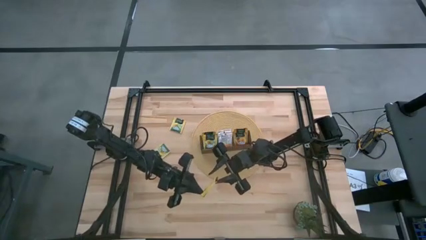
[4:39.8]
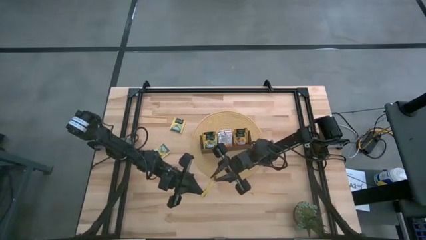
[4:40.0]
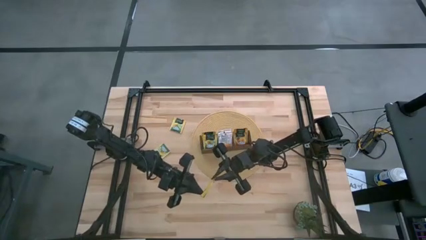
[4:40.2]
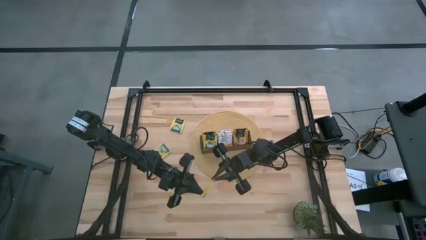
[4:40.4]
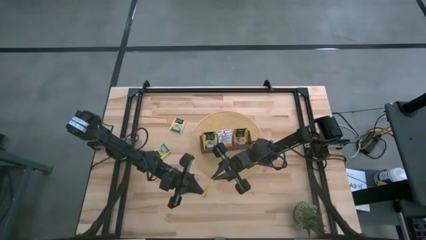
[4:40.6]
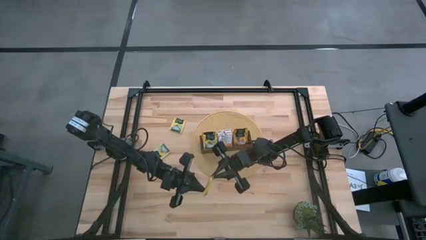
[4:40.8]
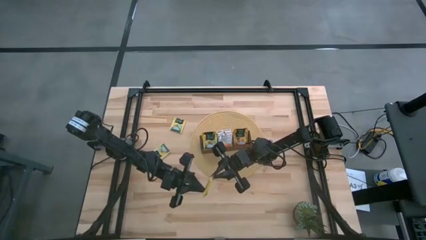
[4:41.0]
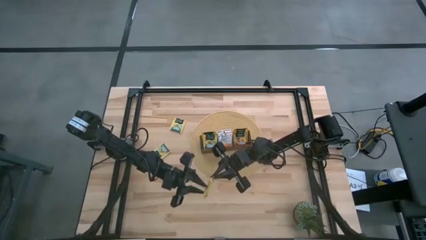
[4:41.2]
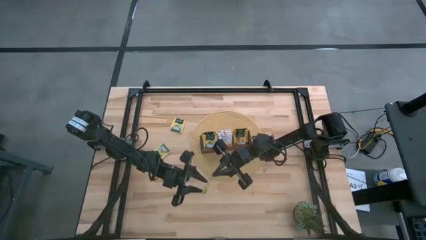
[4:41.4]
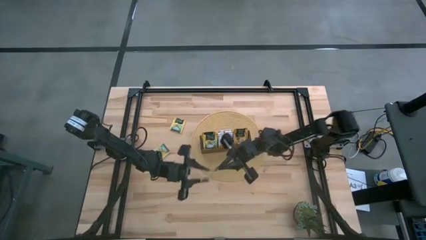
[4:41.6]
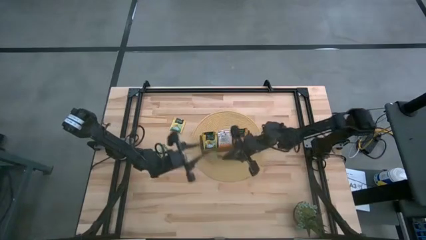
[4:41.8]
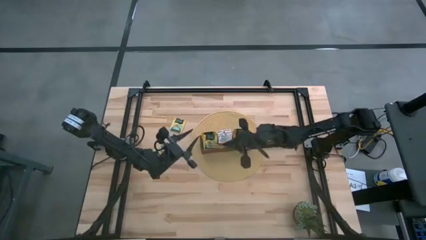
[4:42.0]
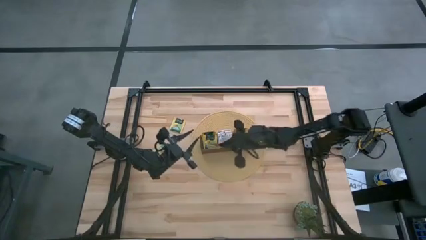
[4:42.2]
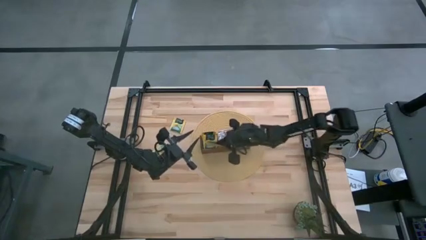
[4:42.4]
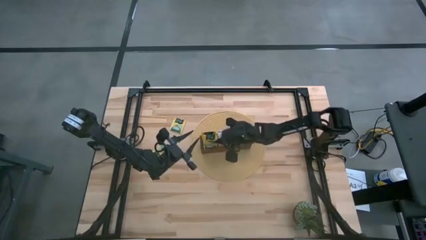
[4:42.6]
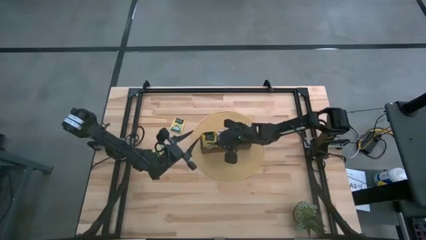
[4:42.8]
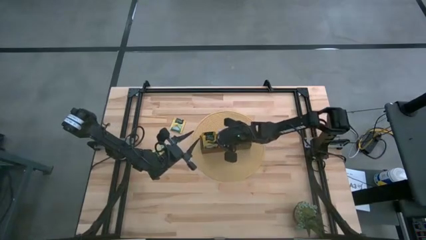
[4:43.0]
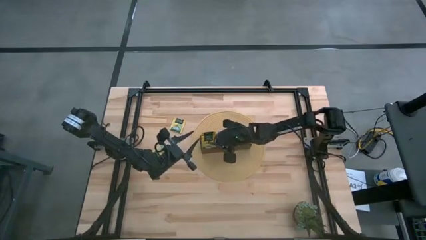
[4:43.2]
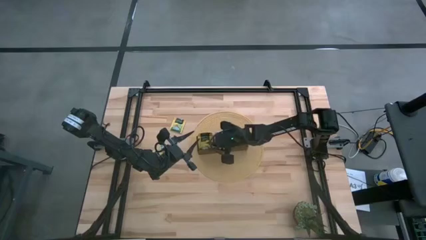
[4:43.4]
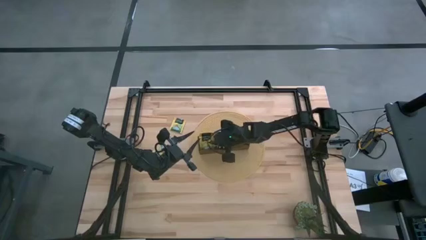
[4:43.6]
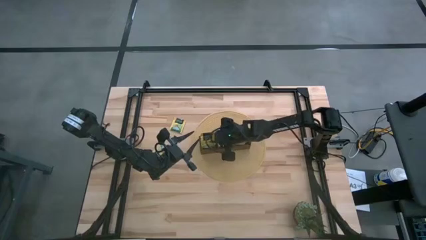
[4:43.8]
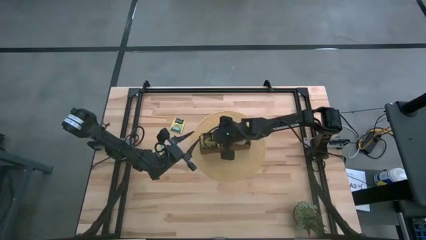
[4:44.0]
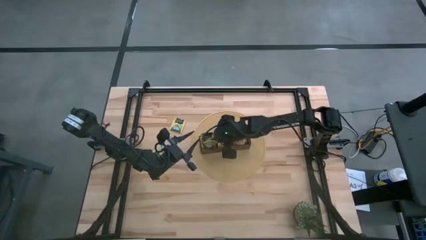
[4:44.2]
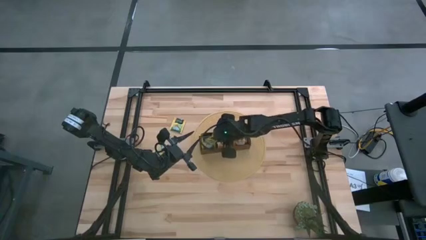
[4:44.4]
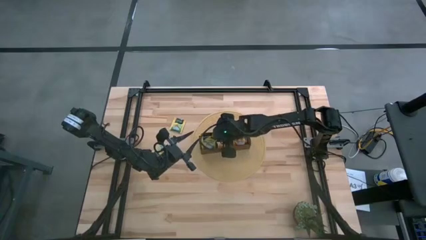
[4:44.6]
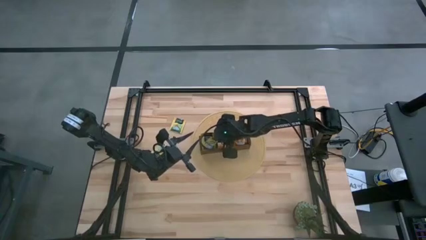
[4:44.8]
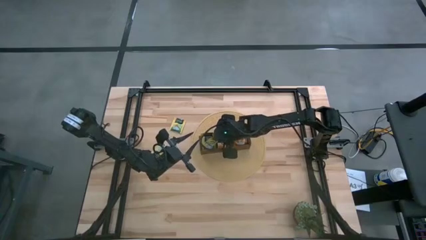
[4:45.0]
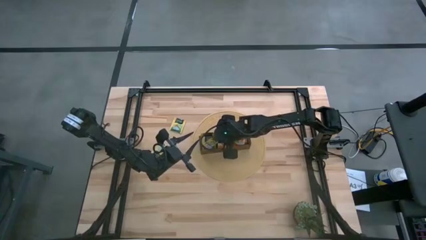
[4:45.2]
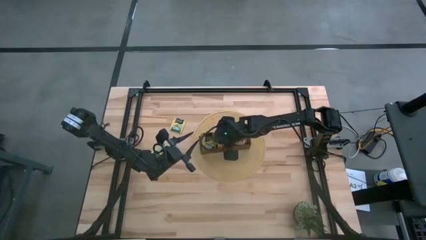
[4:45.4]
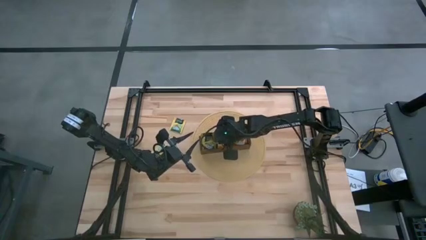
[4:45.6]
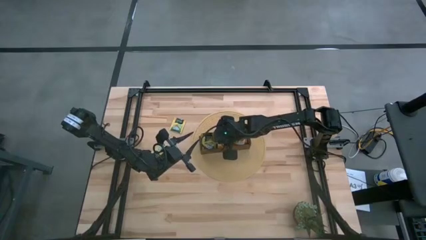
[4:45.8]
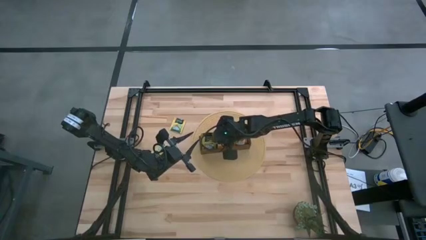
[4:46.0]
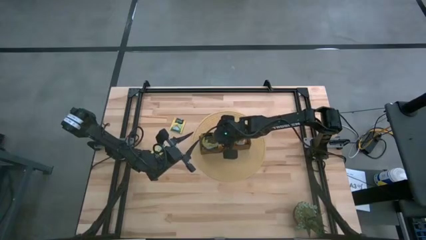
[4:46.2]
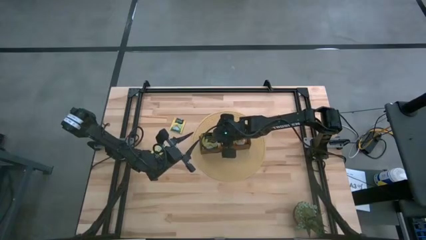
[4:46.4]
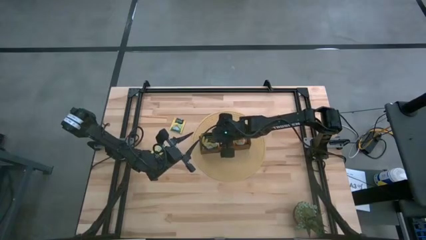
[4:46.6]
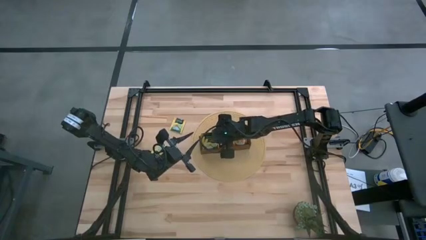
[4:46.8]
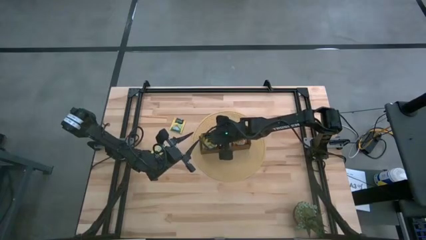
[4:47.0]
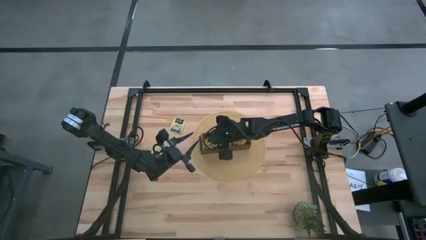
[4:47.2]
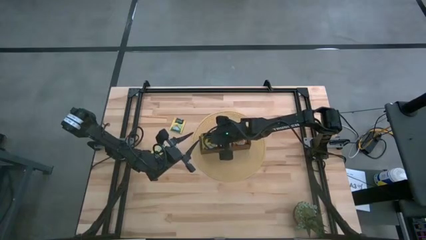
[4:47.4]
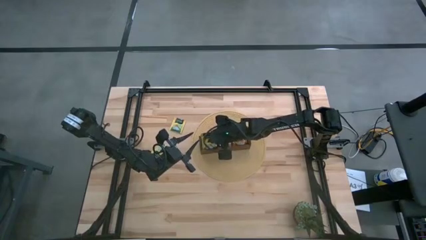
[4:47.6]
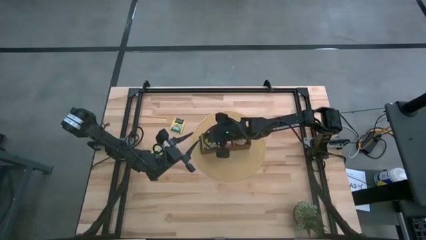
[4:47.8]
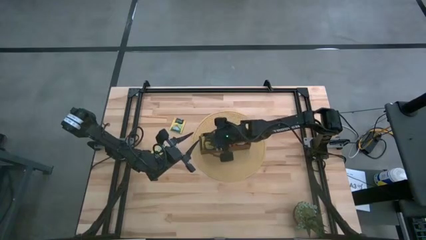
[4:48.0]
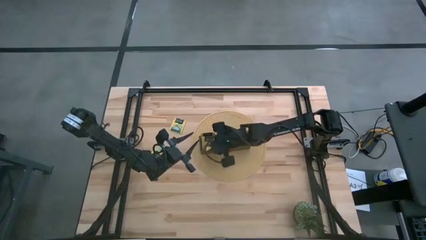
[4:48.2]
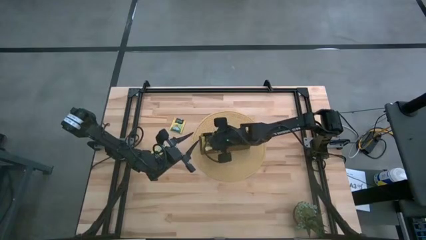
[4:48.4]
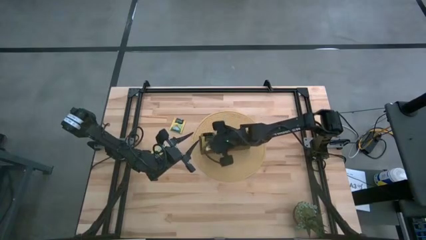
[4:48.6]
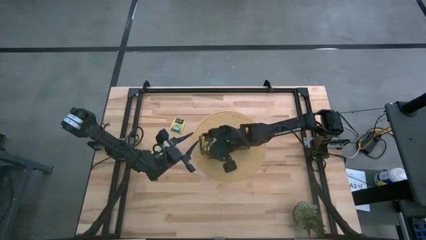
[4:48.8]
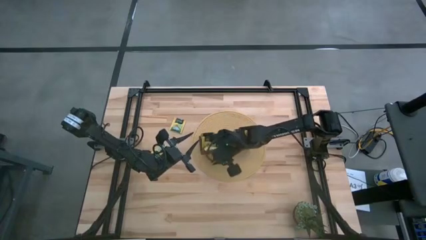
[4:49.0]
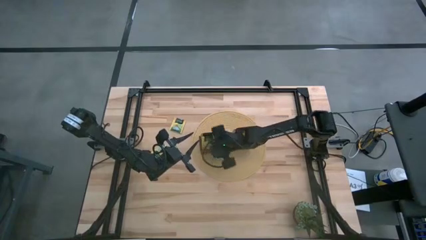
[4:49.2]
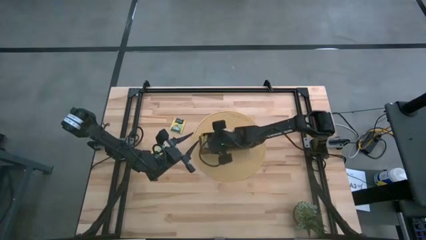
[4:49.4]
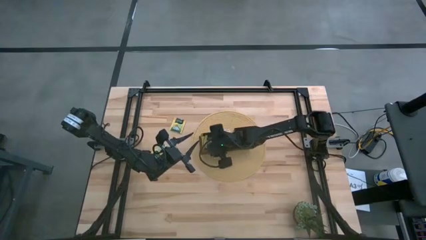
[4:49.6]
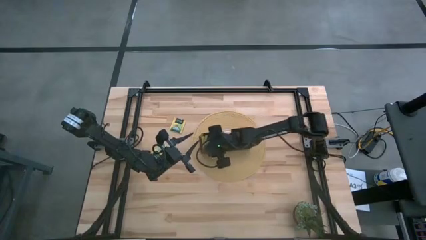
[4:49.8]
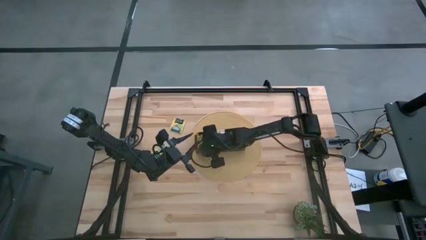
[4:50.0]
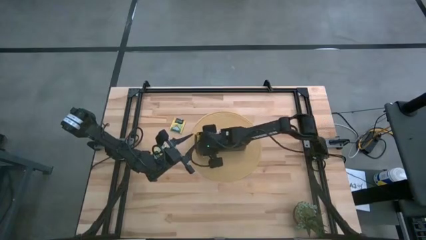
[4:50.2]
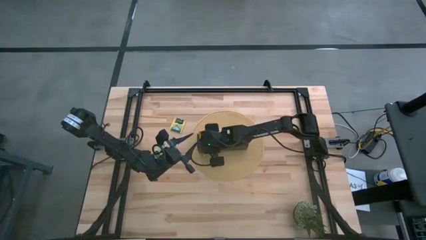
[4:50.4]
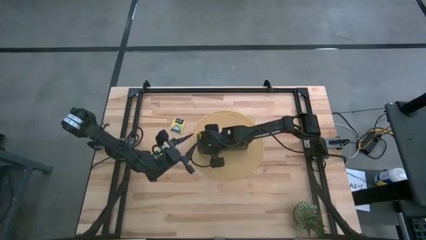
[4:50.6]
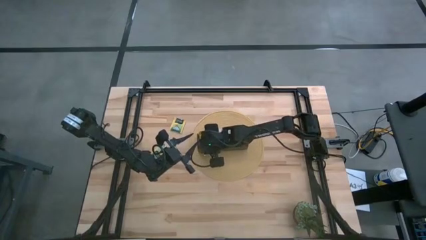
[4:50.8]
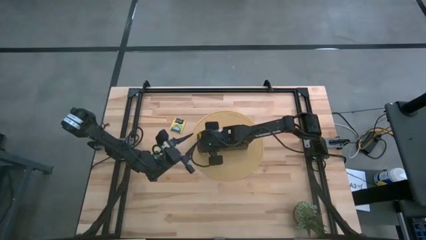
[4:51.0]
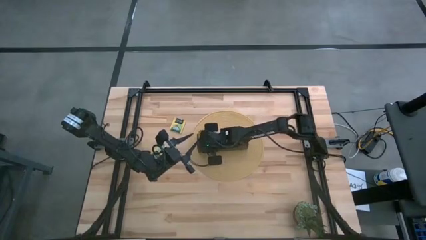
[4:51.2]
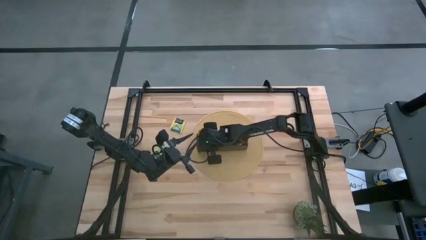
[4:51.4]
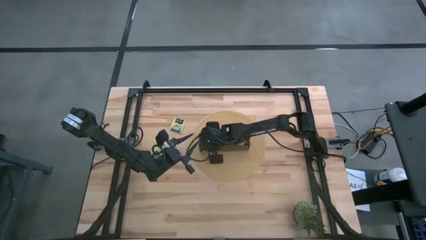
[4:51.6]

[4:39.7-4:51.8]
Task: Pick & Place Tea
Put the yellow tea bag into the left section of the wooden organizer

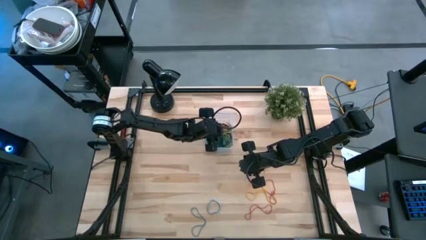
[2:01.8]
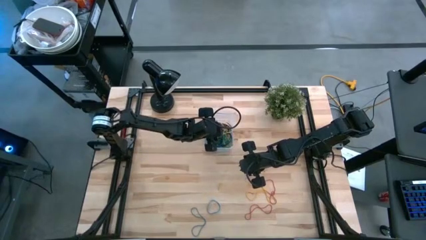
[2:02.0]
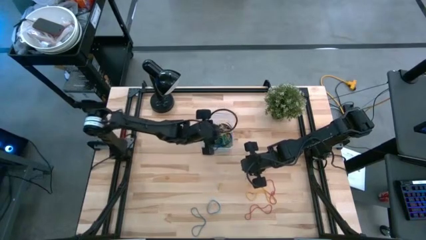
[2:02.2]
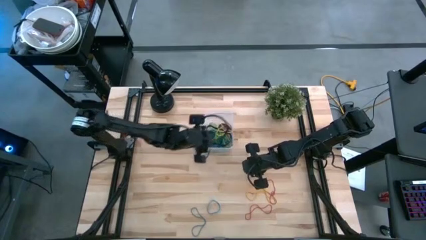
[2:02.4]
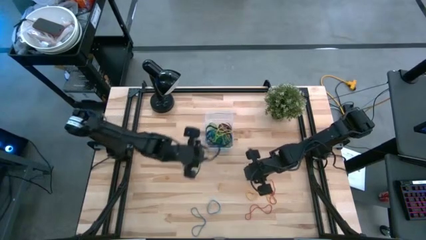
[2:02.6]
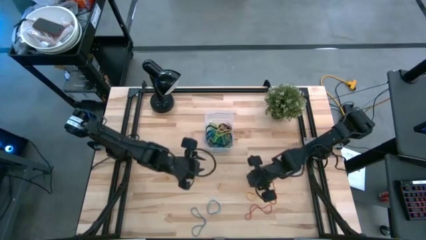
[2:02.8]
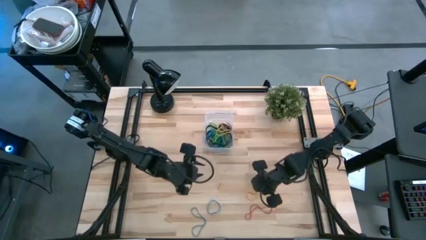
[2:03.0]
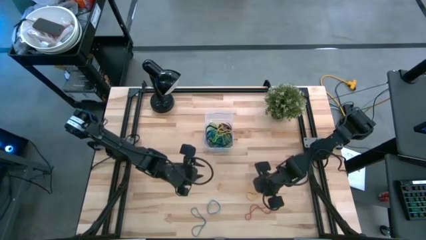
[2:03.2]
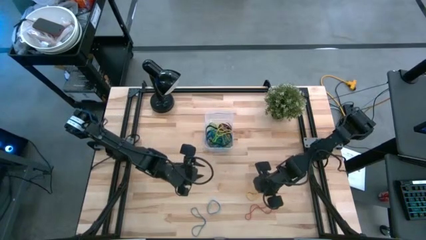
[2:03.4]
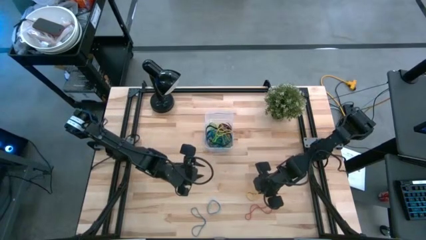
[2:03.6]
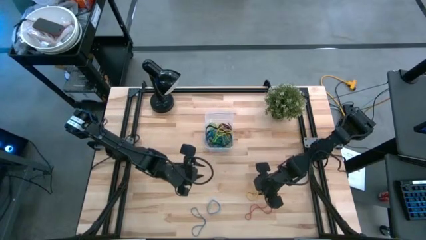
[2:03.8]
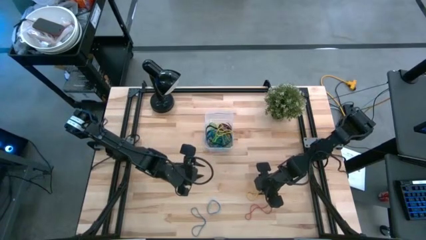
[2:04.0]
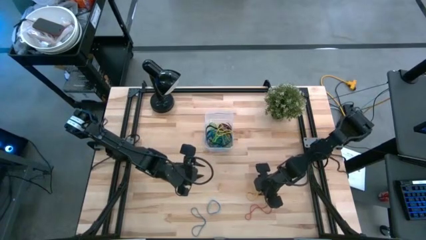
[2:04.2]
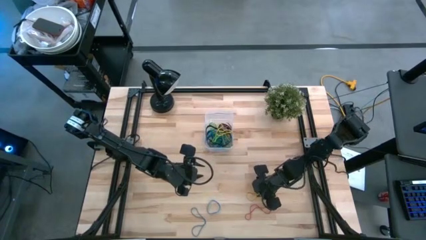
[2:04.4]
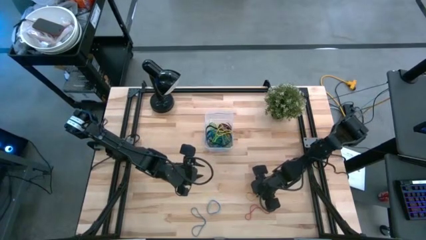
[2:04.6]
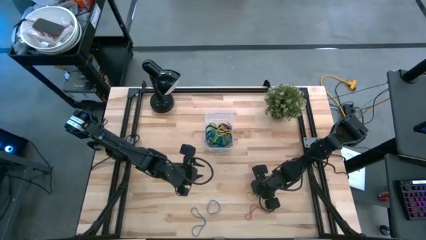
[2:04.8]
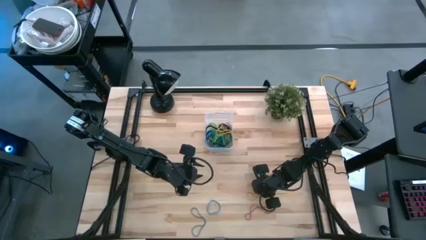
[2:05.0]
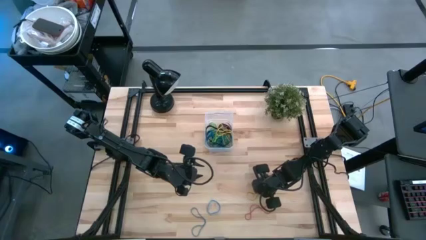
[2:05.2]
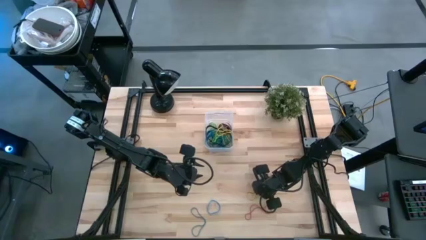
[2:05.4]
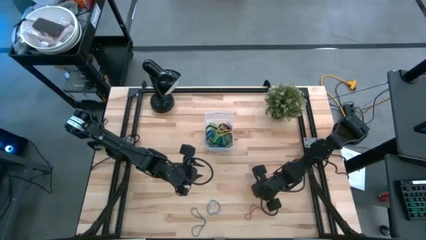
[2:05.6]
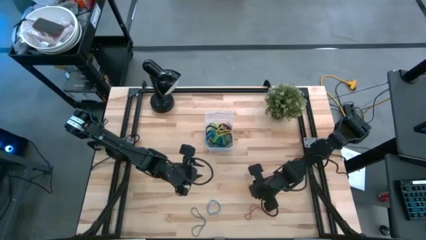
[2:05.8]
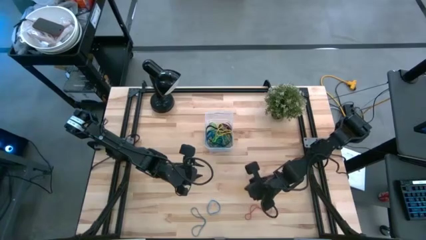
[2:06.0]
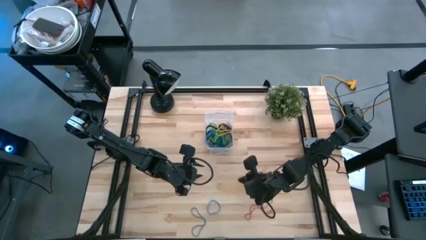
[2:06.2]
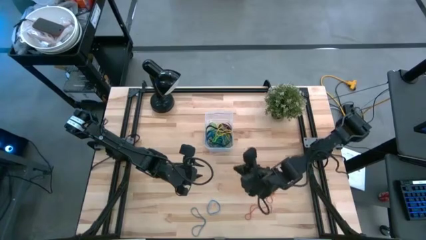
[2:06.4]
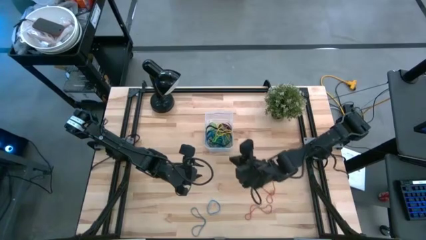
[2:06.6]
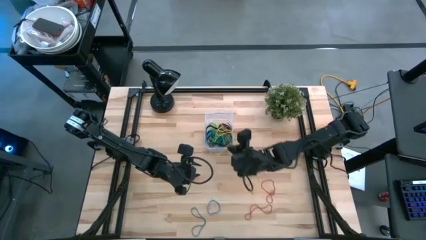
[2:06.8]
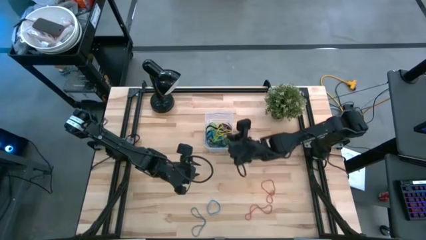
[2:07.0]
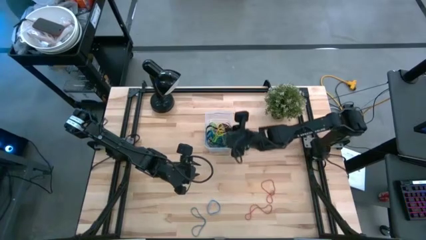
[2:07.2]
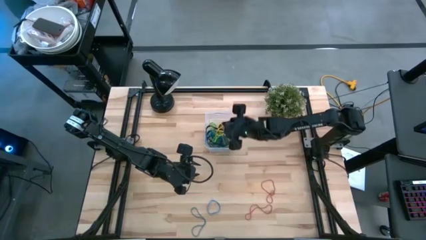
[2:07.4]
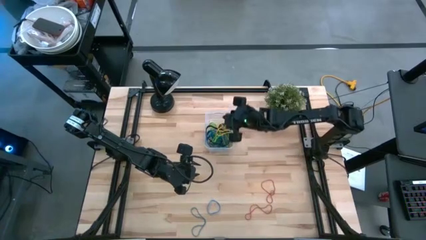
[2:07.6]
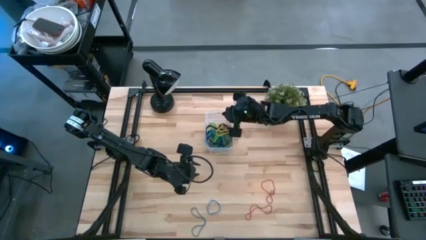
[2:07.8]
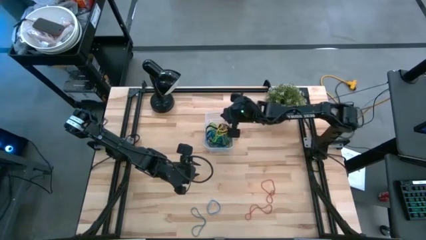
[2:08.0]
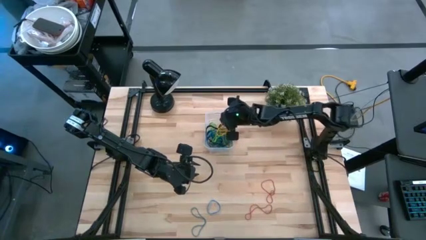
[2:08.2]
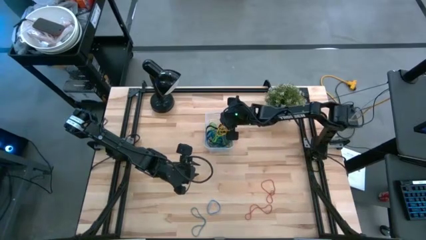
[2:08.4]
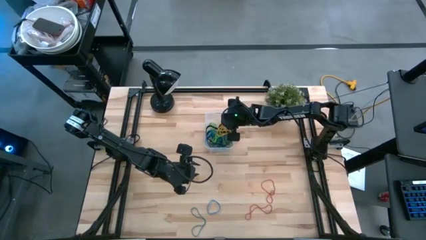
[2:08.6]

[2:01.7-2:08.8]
Task: Pick and place rubber bands into bin
Put yellow rubberband into the transparent bin
